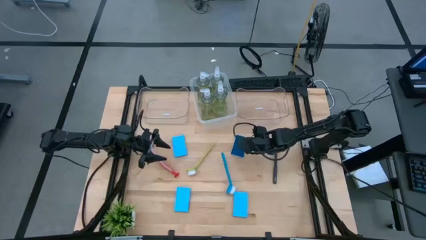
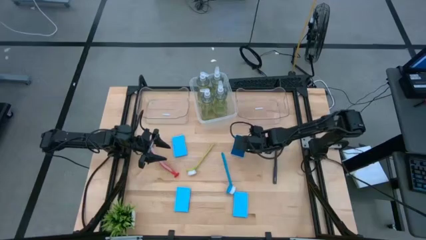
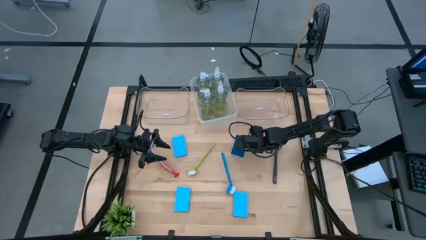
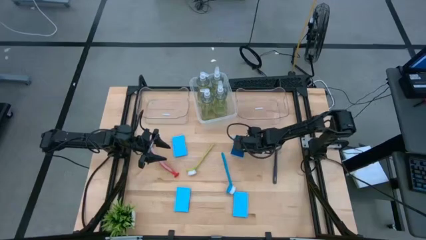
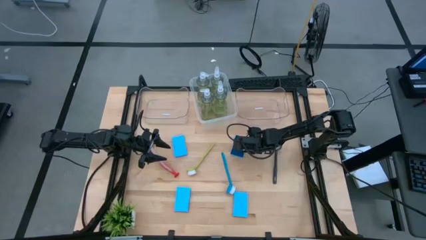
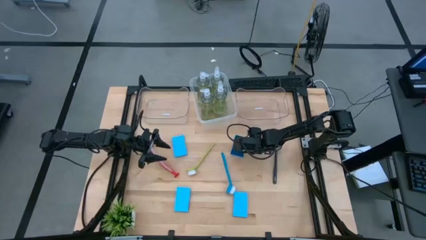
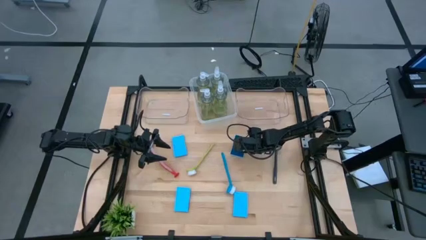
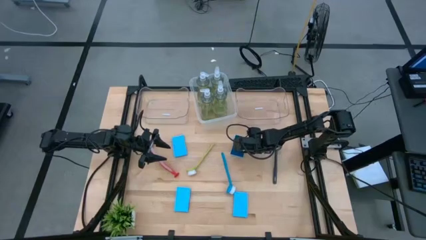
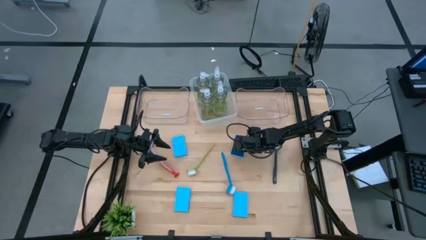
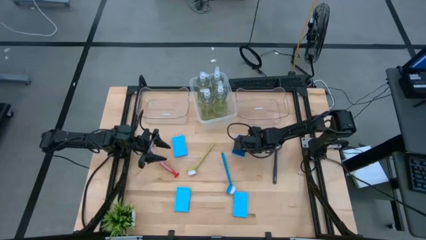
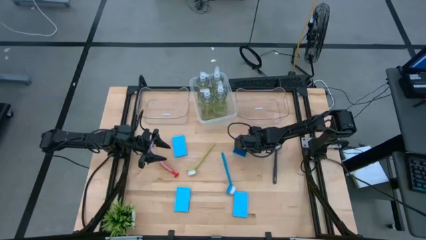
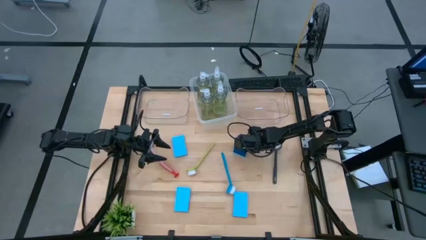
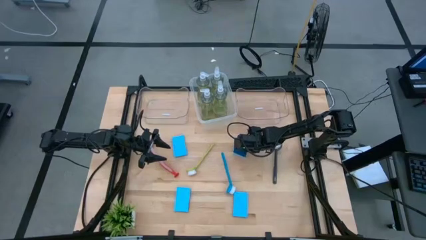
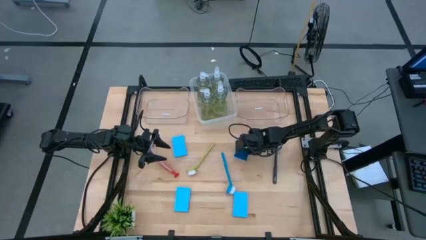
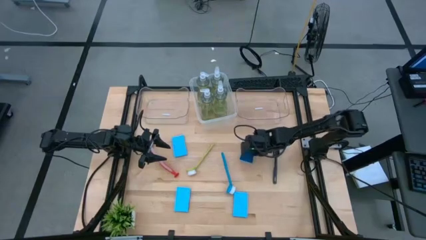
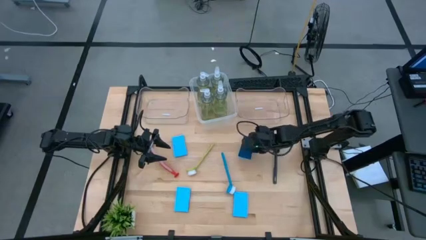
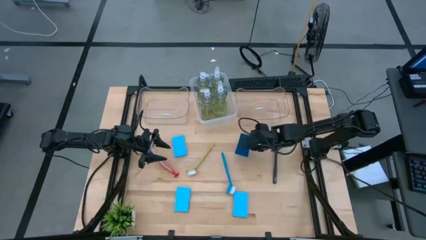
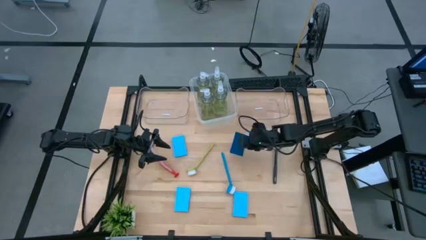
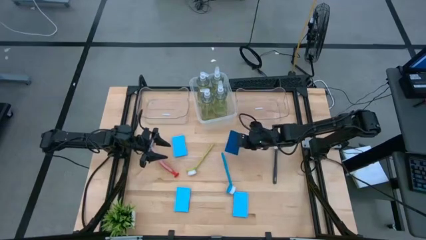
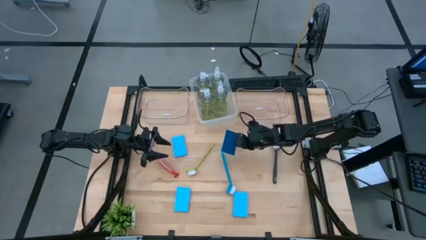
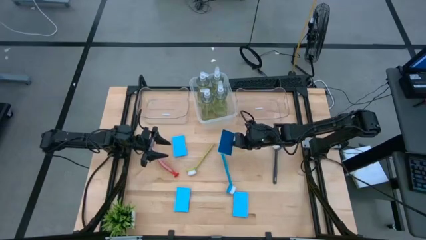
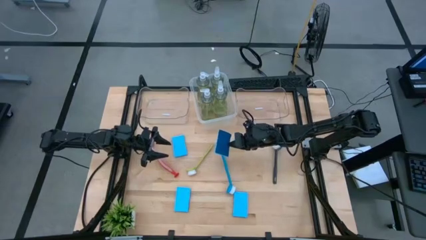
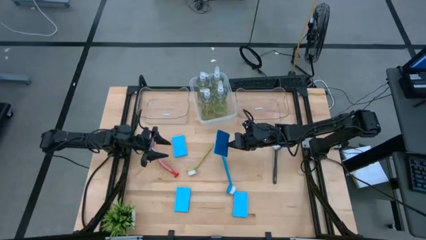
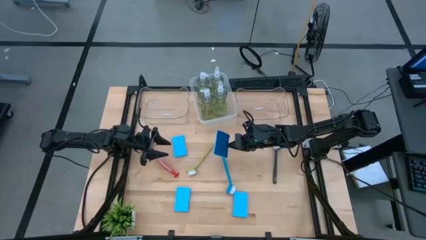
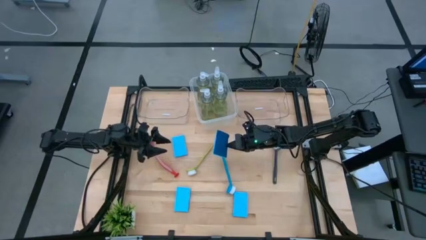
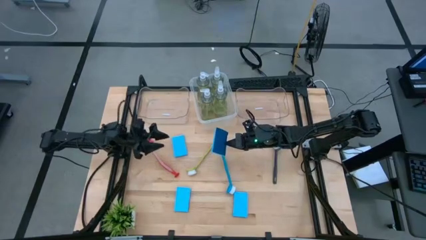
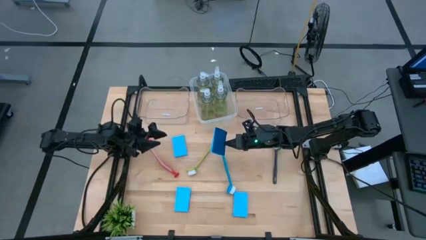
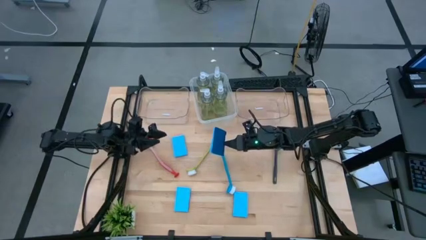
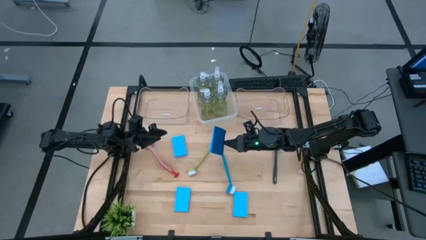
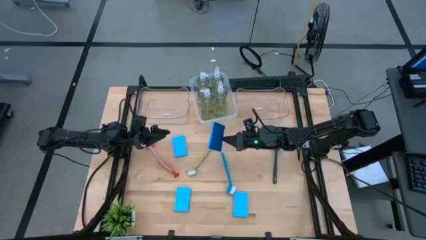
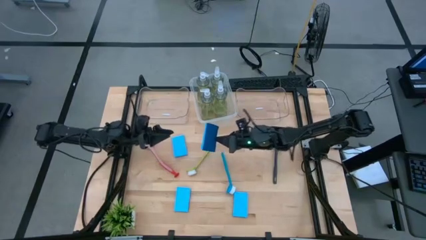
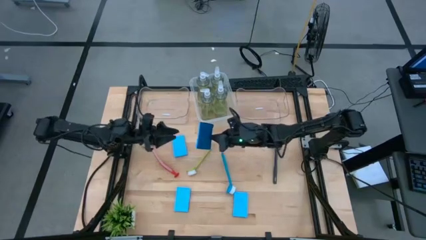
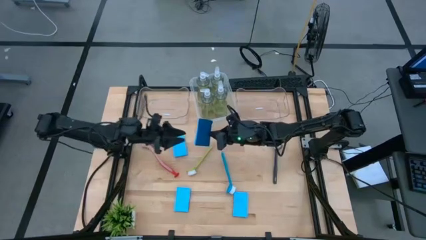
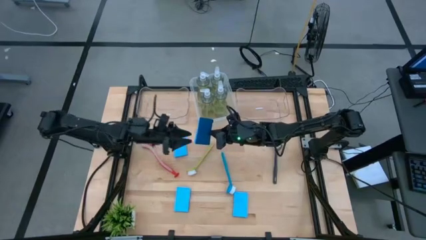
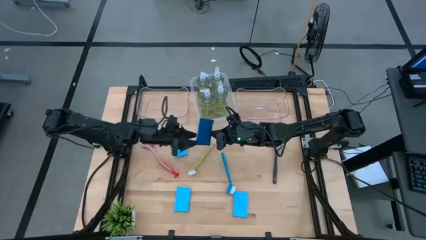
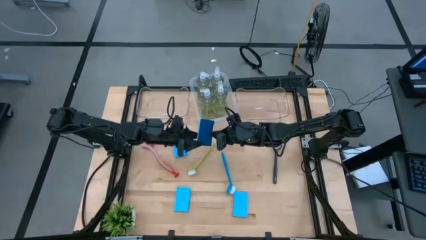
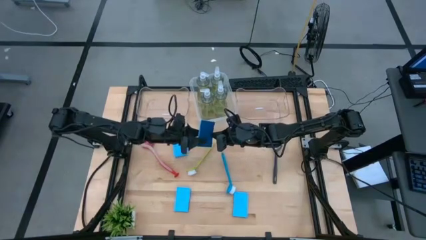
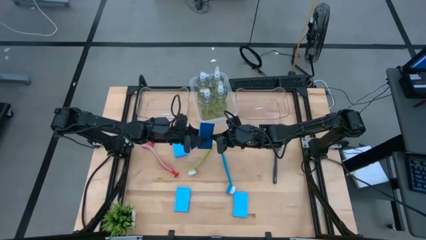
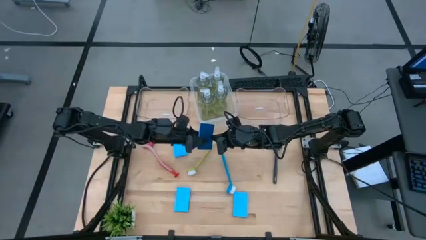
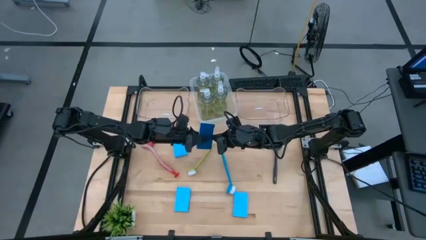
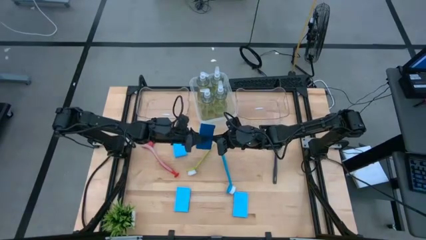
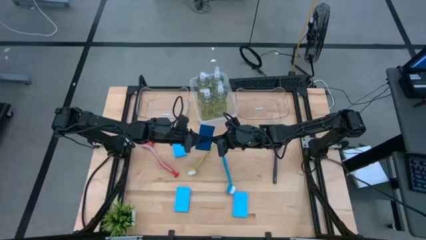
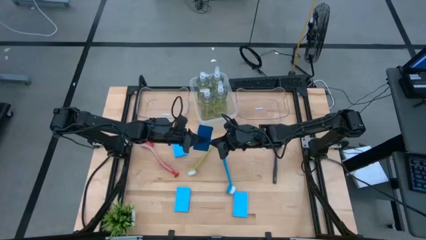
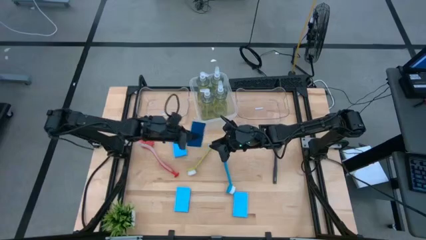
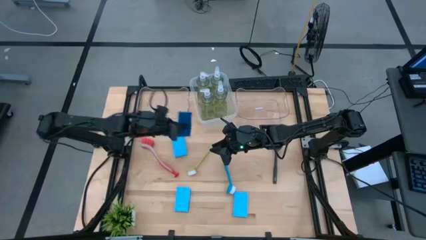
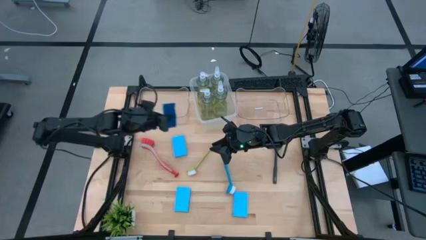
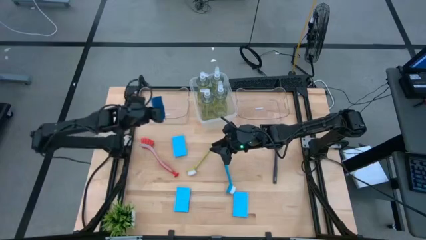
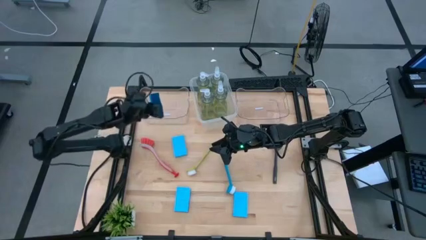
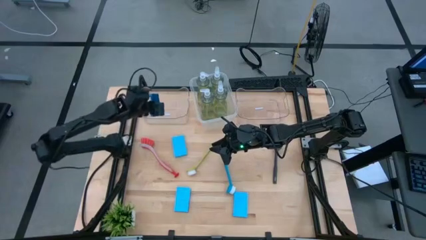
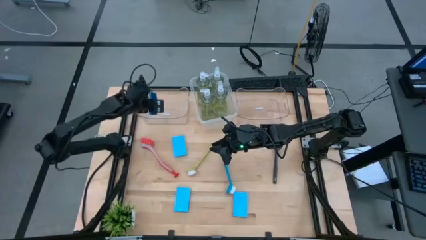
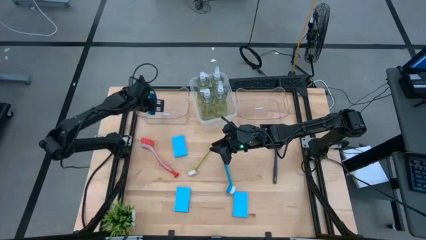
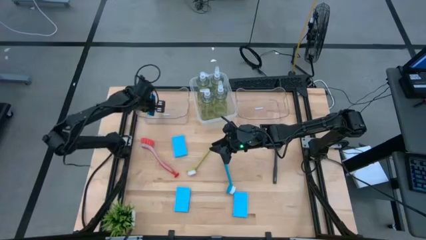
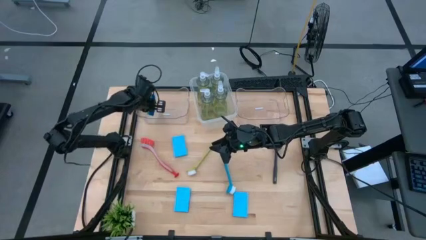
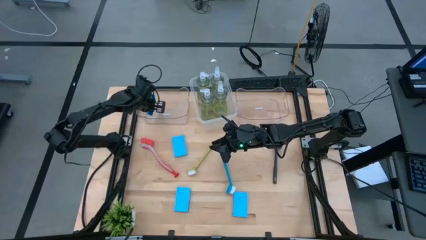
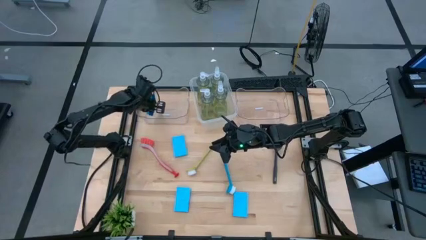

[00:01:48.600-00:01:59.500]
Task: Pick & Place Kitchen Sink Supplies
Put the blue sponge into the left transparent bin

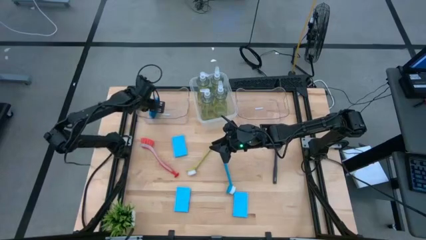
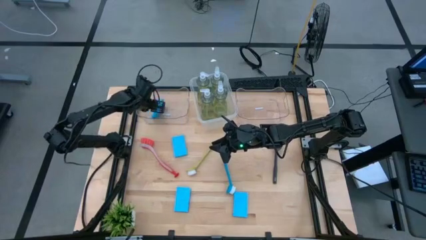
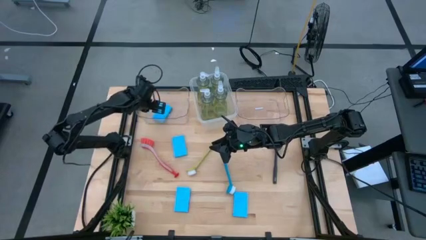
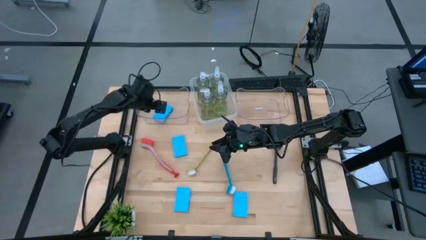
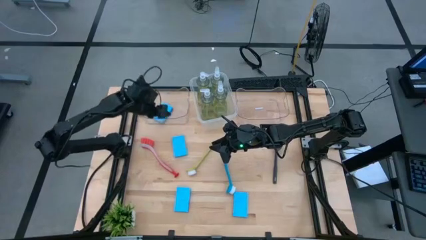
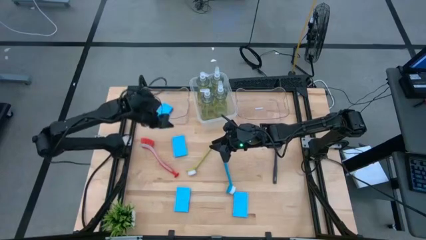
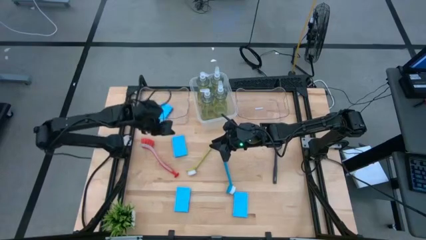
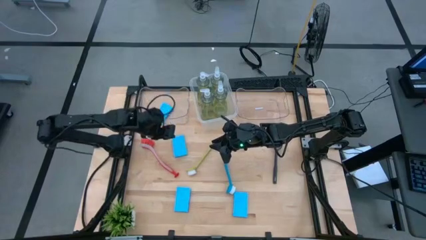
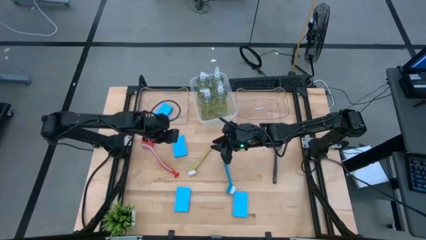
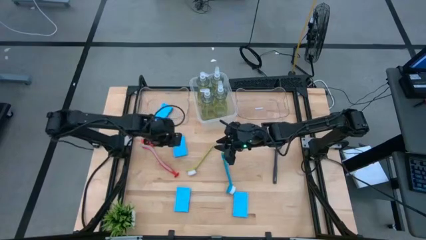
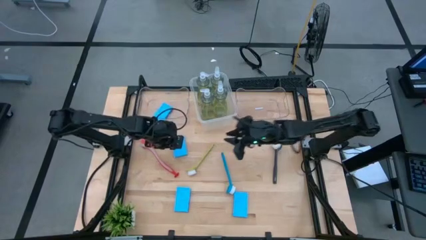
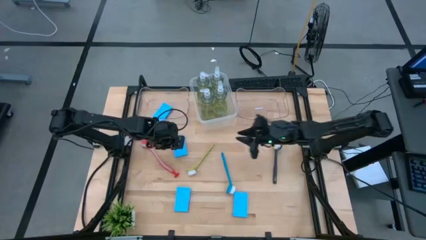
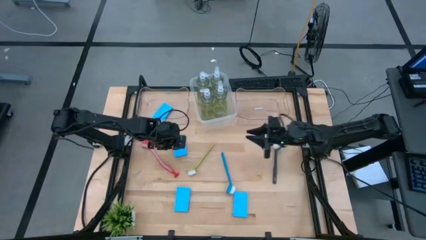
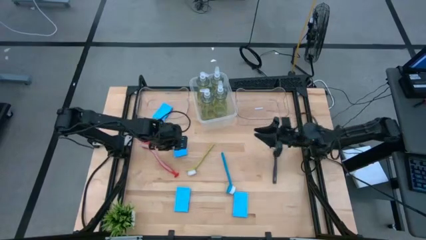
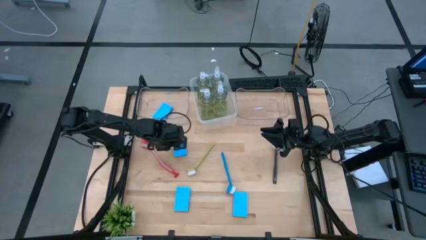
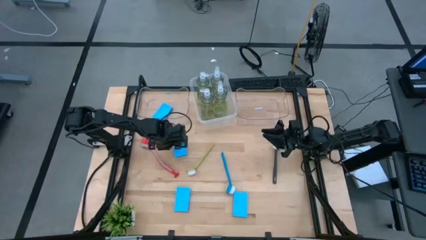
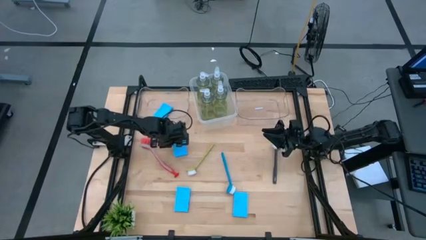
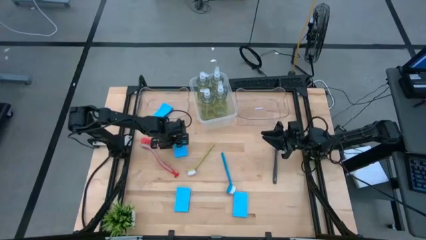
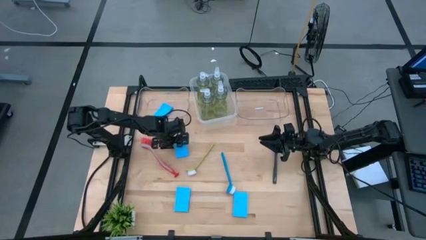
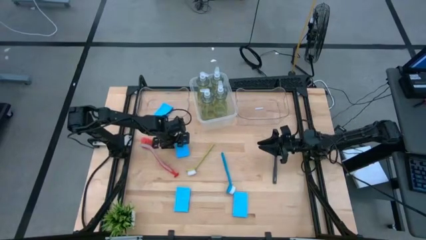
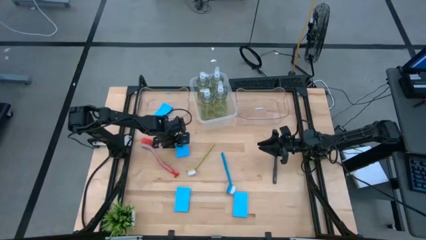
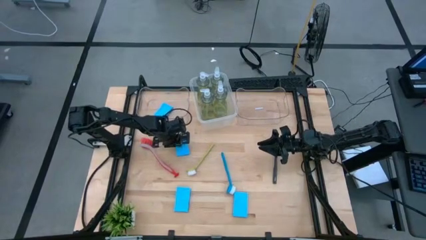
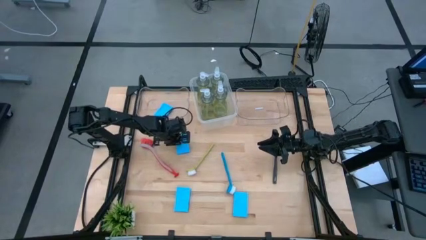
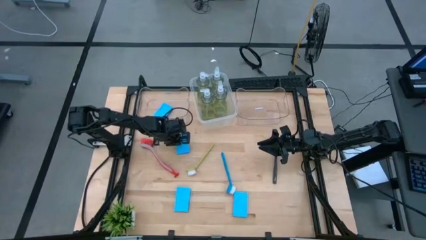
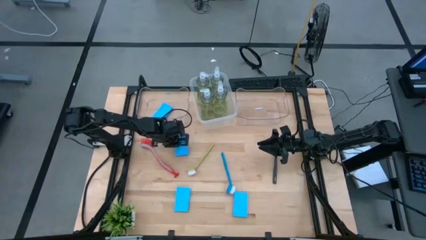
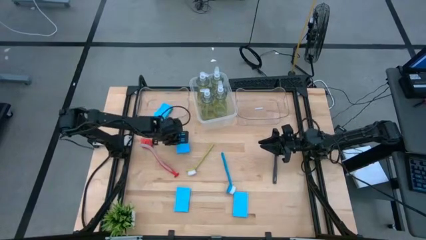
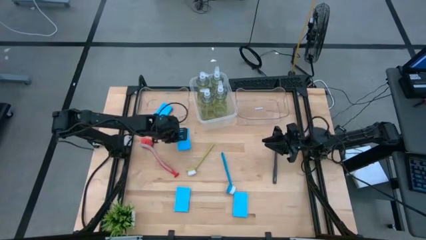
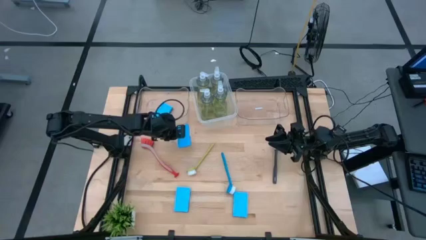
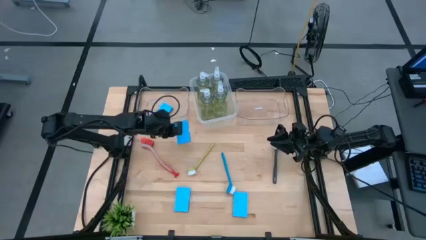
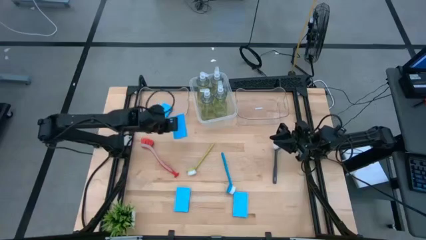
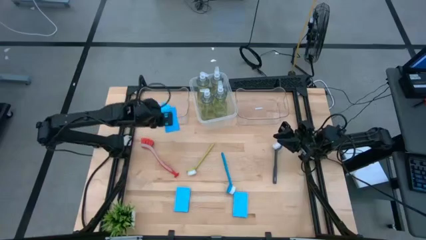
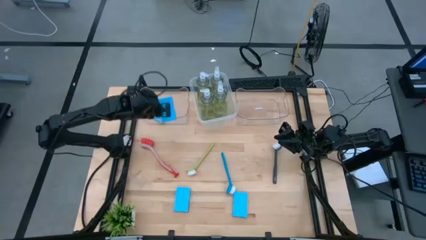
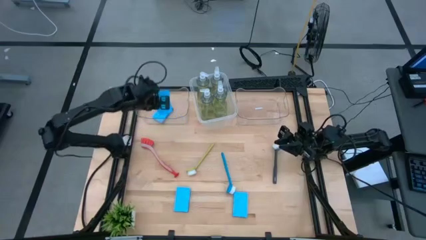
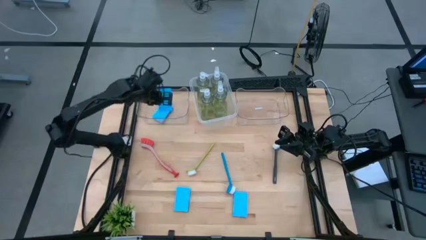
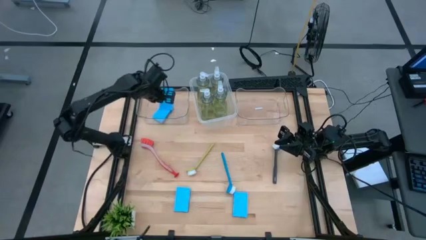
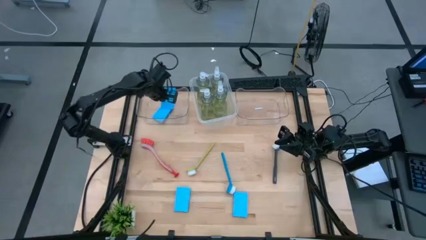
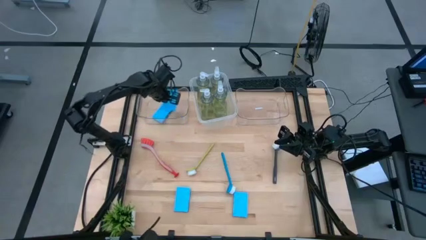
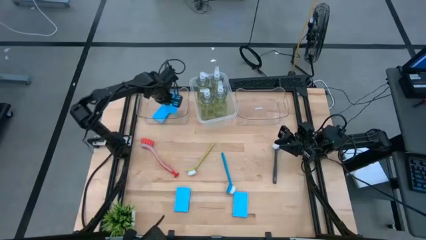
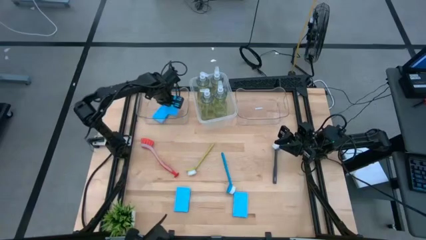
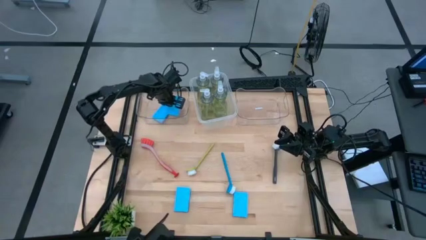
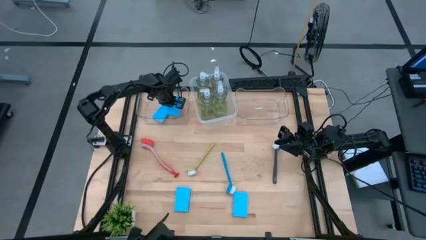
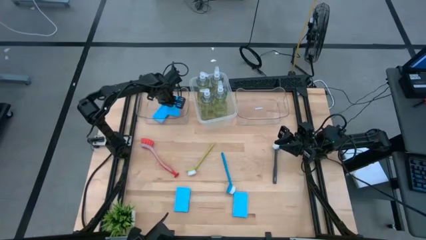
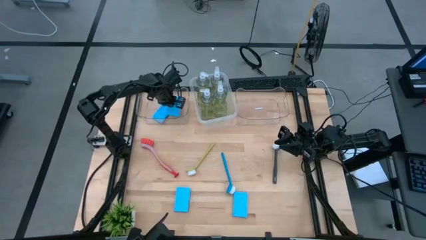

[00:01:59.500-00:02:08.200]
Put the blue sponge into the left transparent bin
